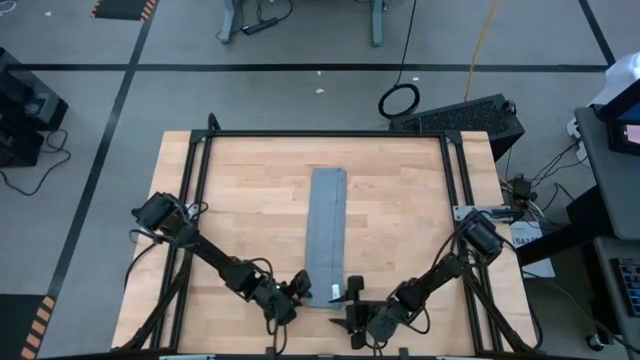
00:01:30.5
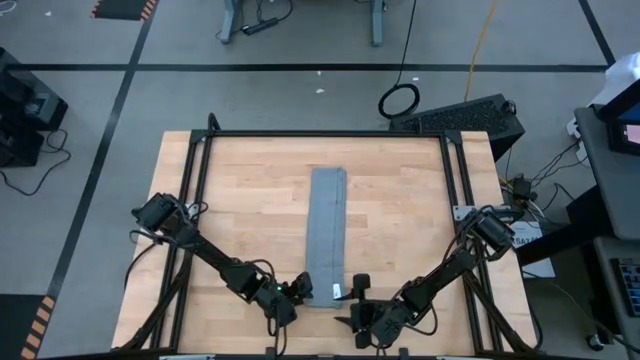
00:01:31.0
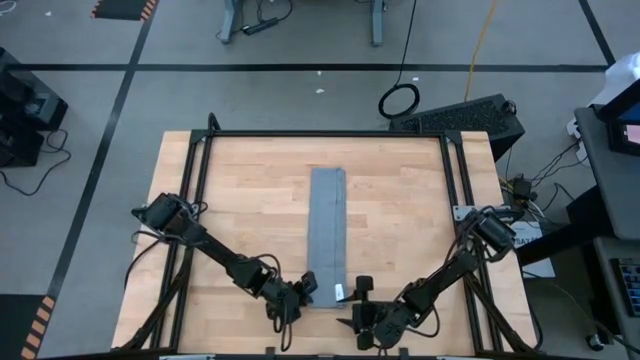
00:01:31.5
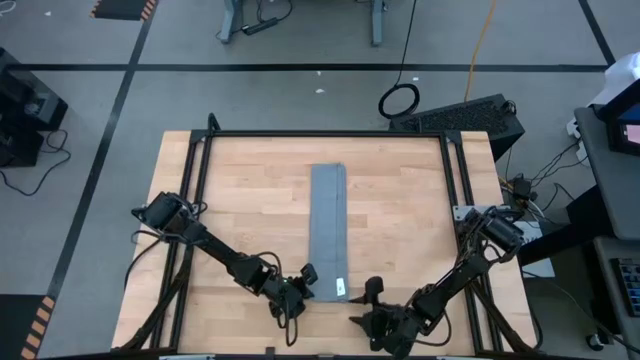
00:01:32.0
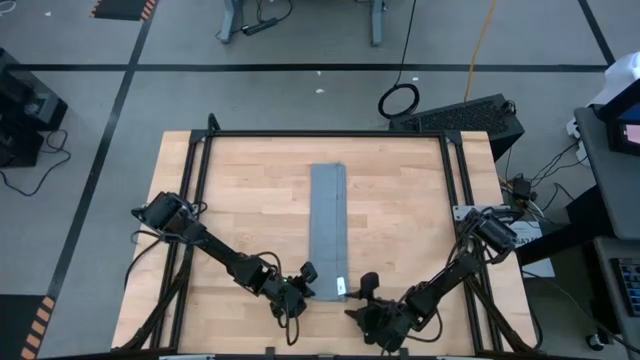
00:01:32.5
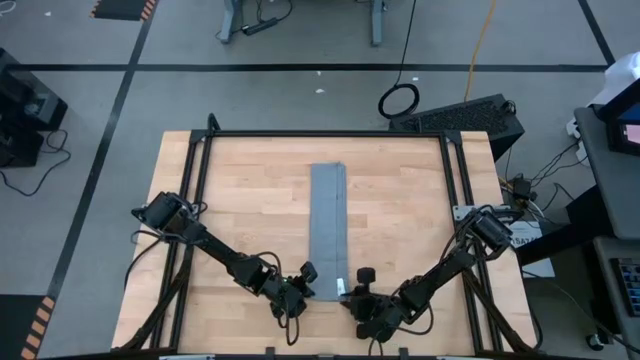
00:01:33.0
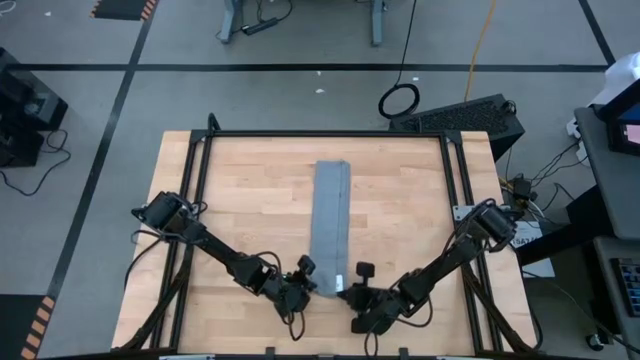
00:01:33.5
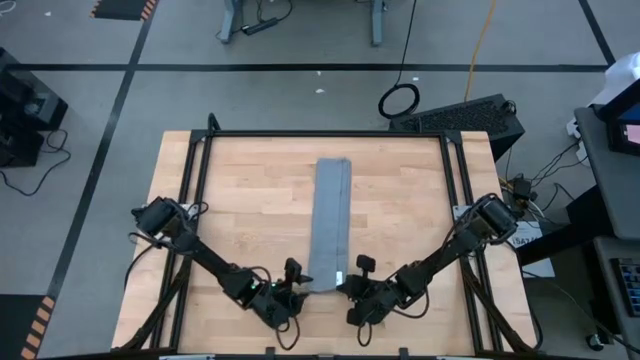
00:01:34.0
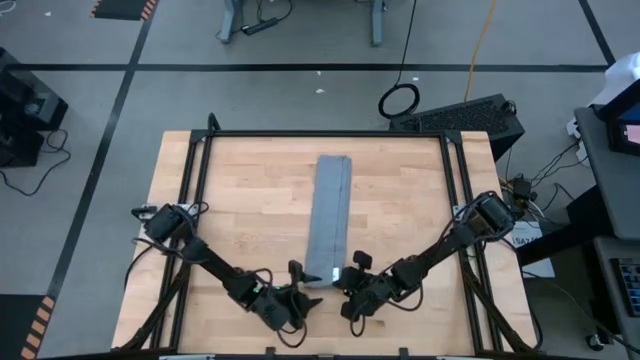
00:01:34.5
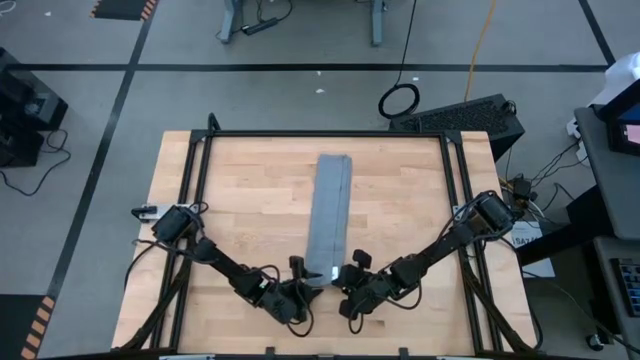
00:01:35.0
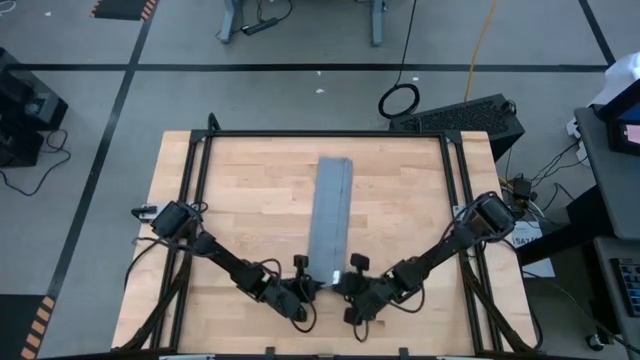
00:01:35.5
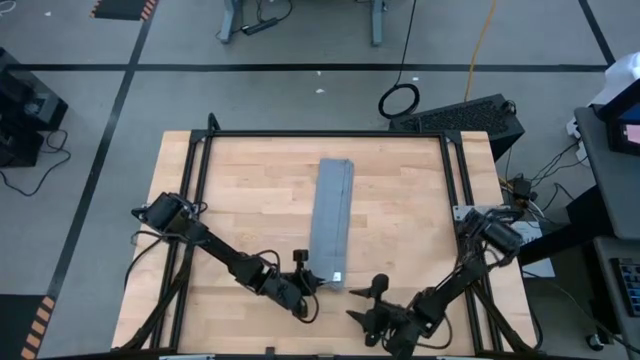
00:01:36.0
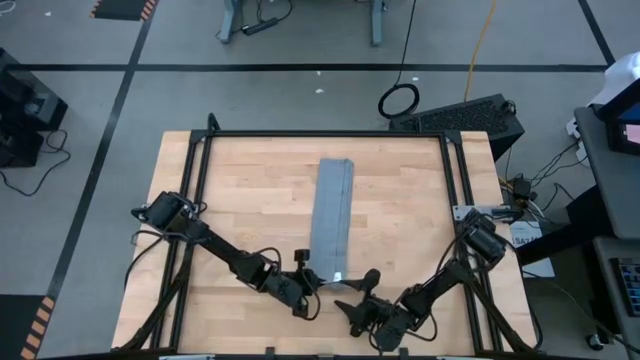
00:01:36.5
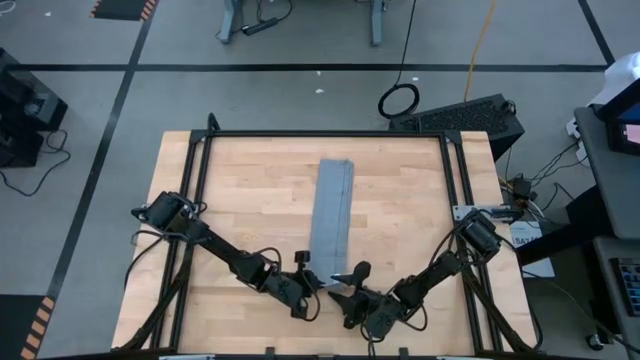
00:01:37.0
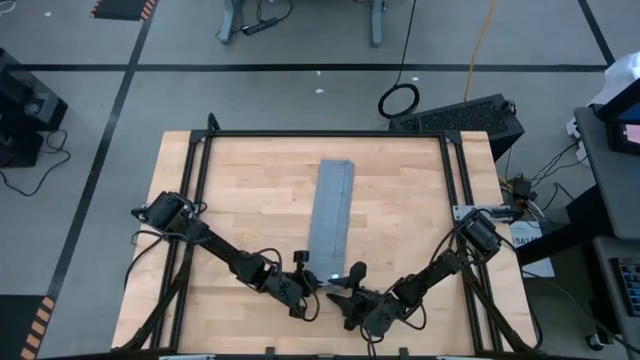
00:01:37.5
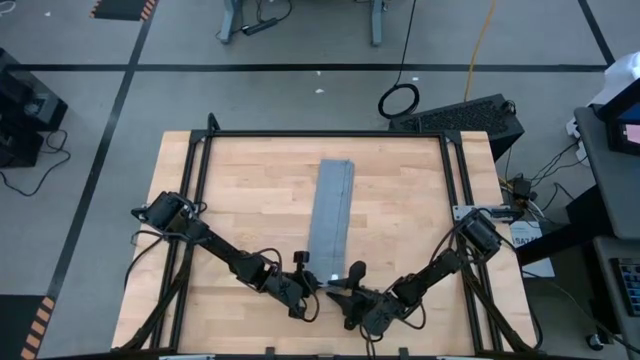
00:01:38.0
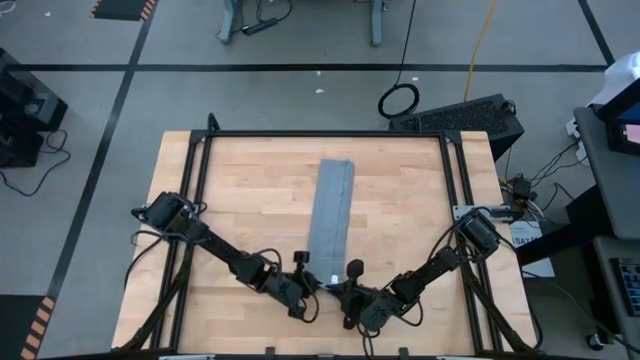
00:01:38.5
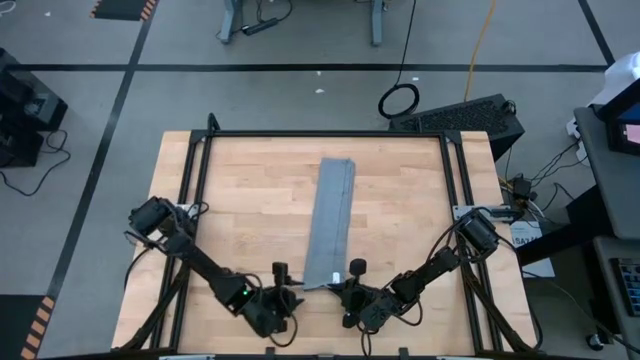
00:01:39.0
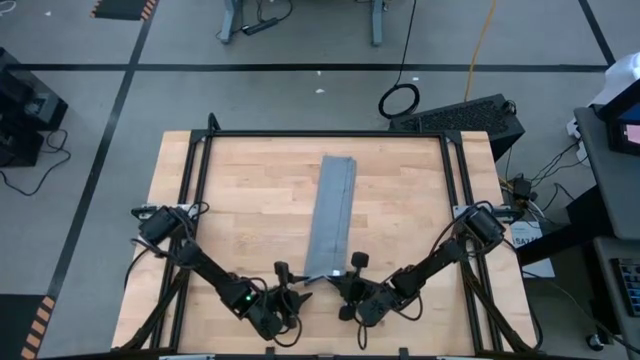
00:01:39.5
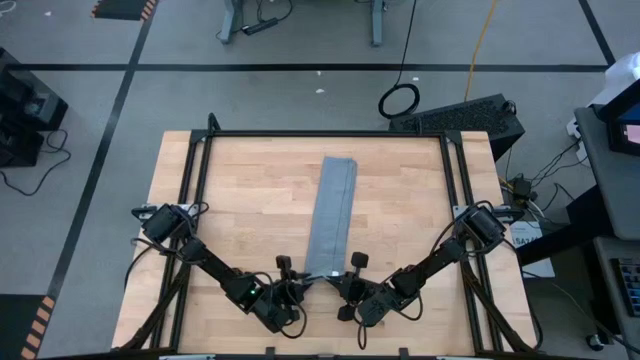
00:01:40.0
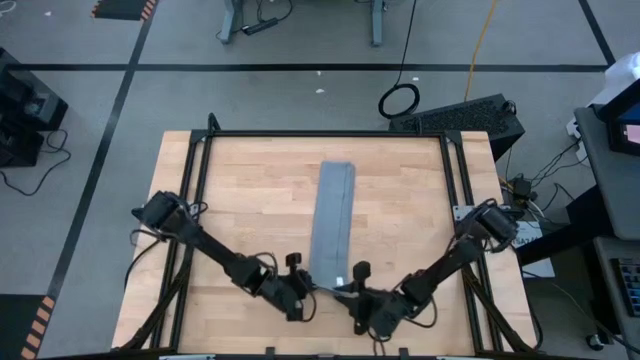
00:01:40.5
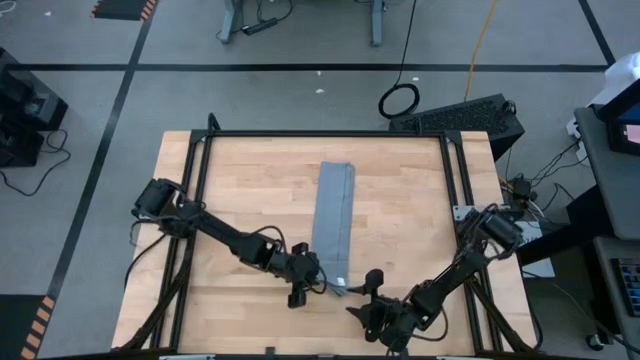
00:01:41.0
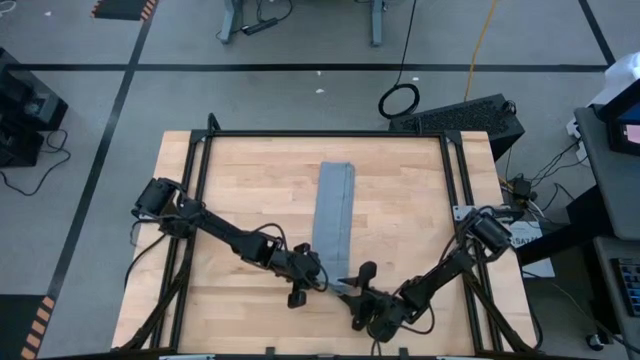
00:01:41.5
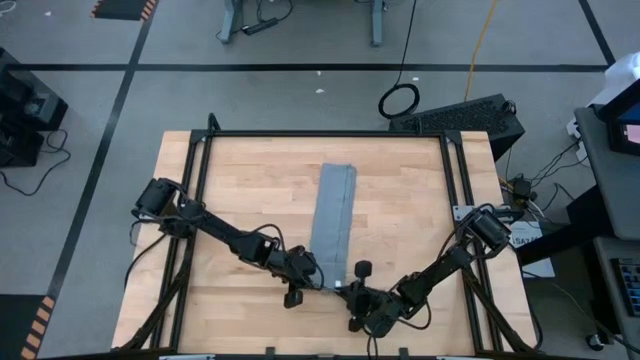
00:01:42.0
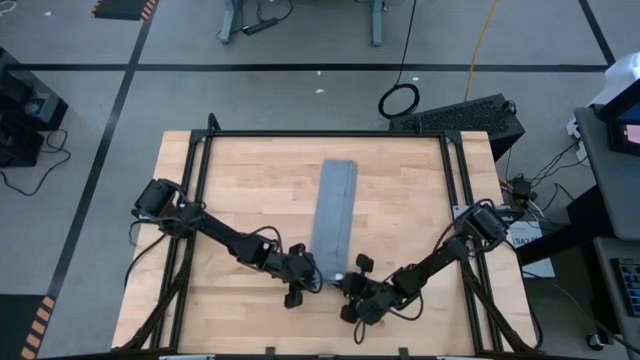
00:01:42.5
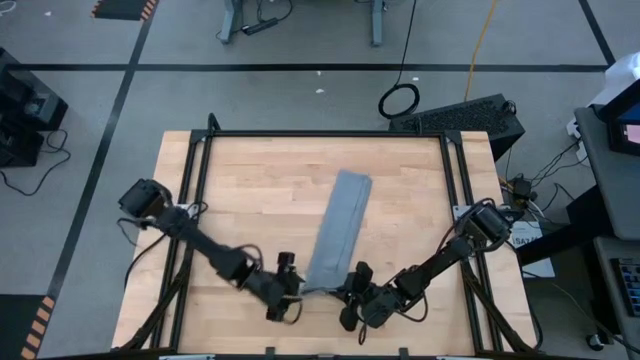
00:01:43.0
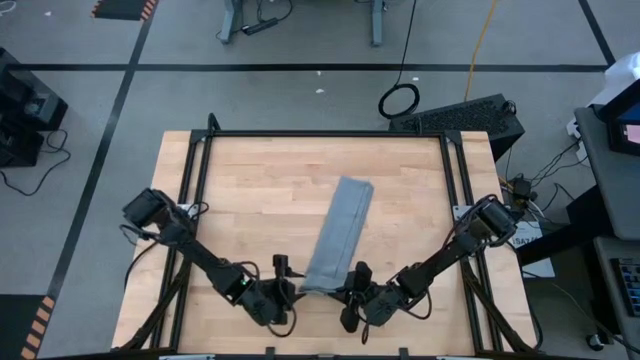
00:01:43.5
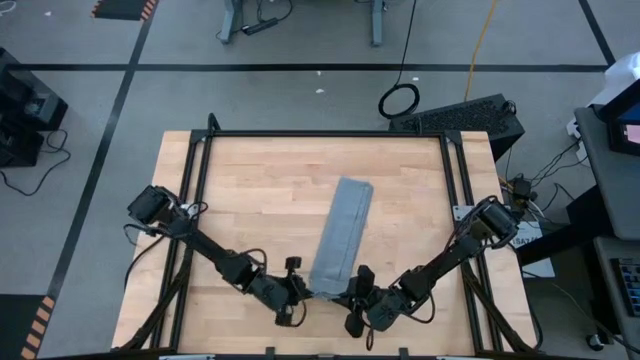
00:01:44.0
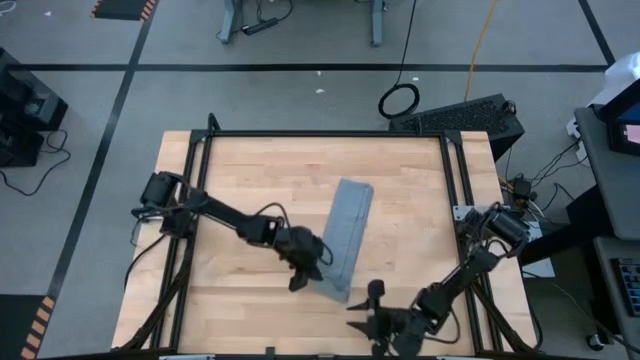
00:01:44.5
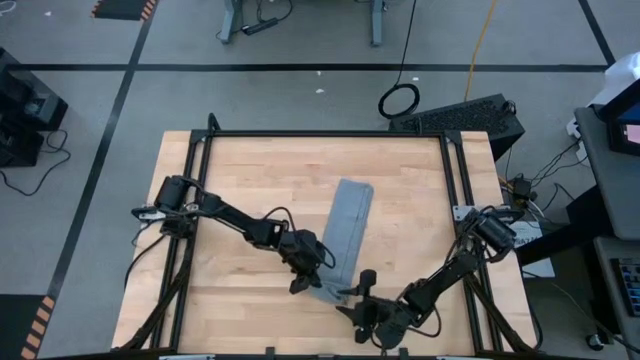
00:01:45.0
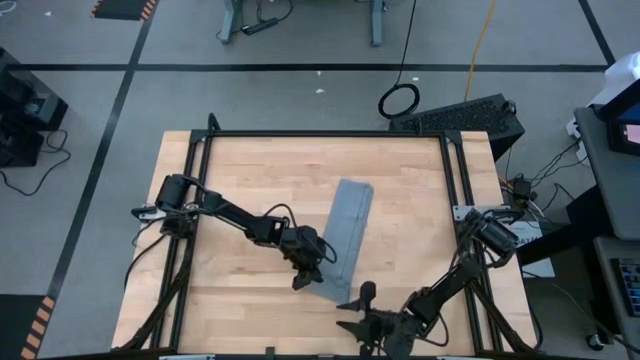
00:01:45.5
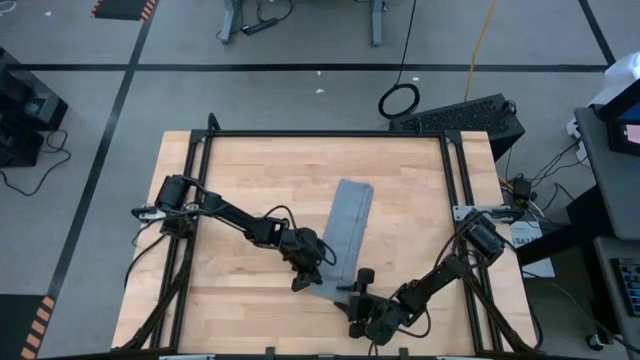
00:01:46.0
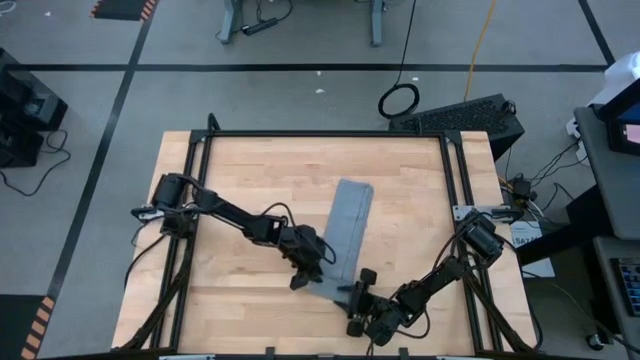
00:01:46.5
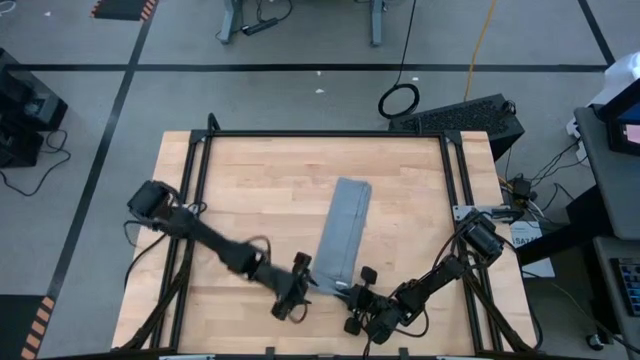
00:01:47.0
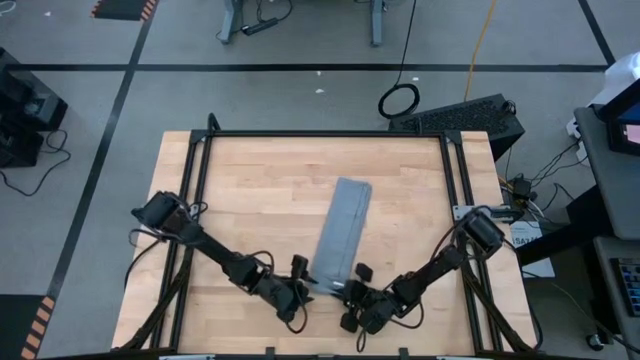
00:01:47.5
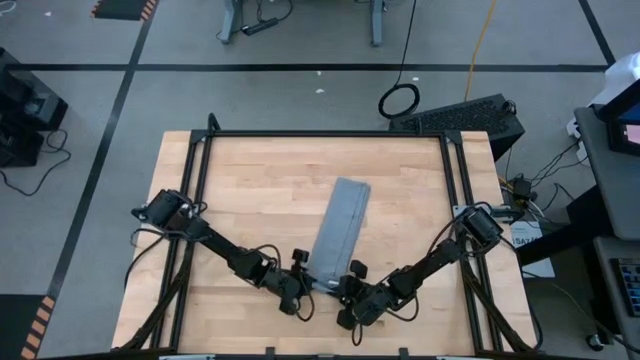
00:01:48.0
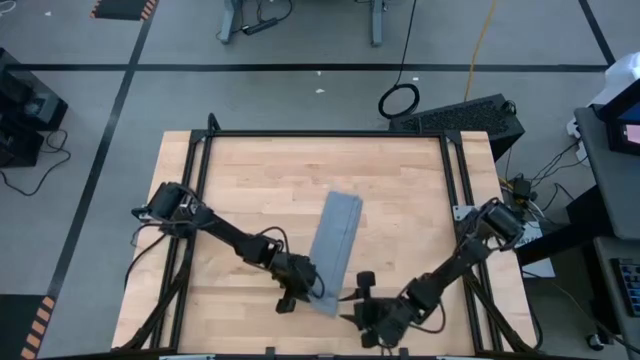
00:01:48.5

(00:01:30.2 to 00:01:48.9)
Task: Roll towel
Roll the gray towel on the table

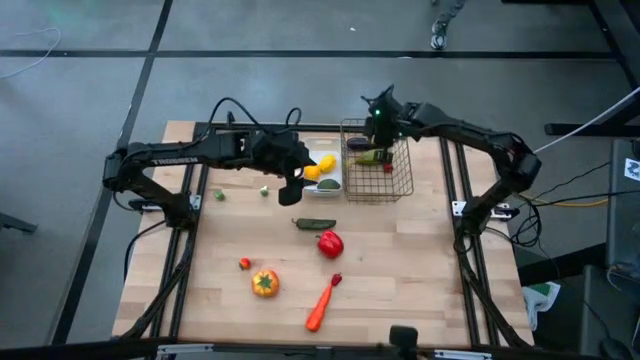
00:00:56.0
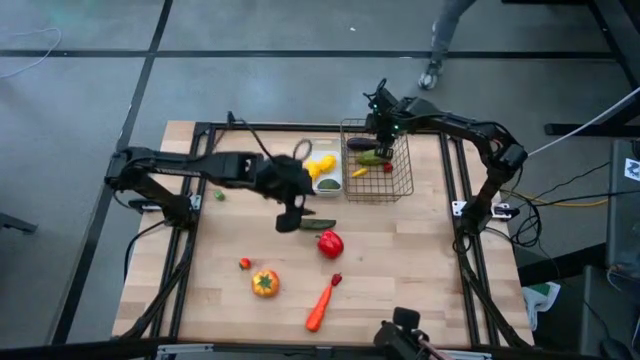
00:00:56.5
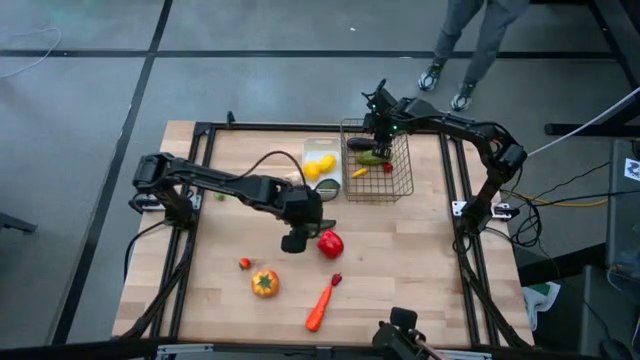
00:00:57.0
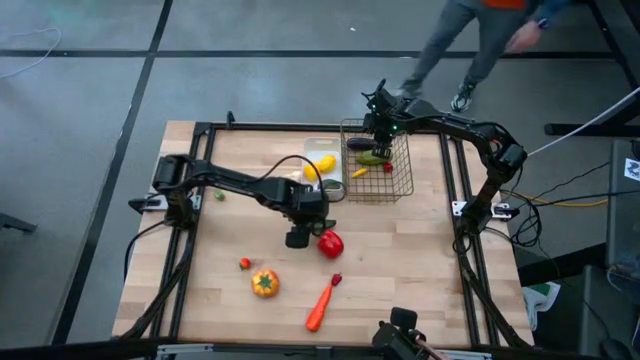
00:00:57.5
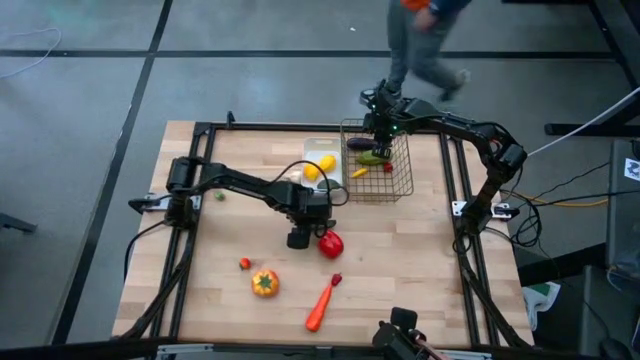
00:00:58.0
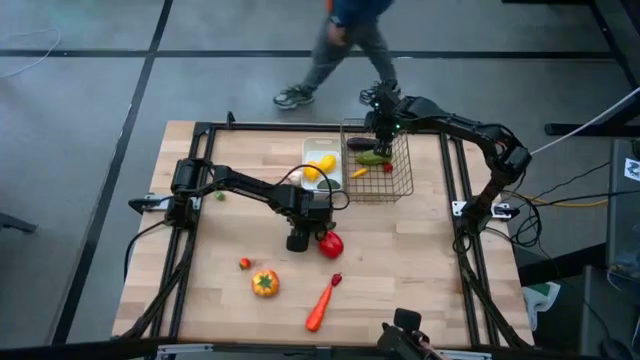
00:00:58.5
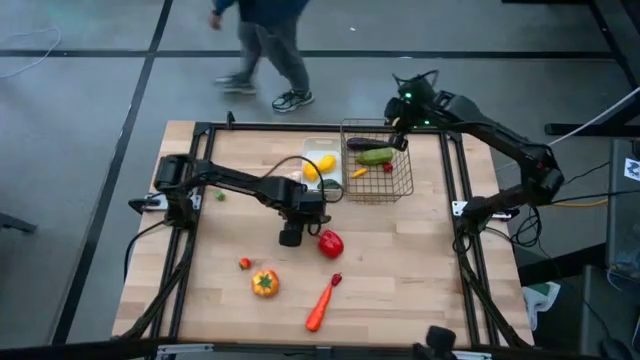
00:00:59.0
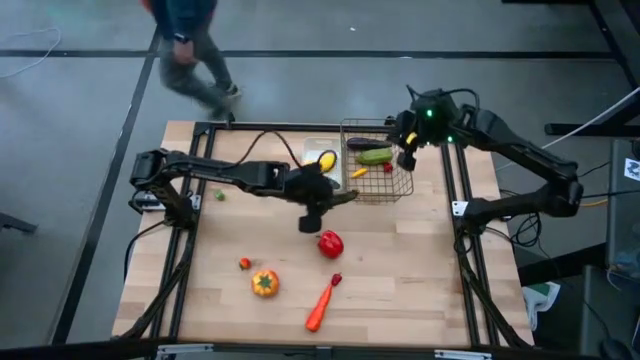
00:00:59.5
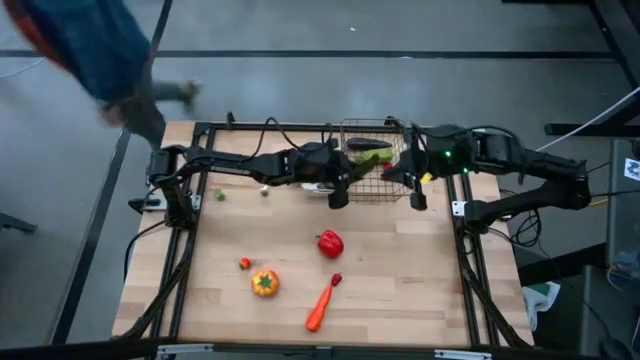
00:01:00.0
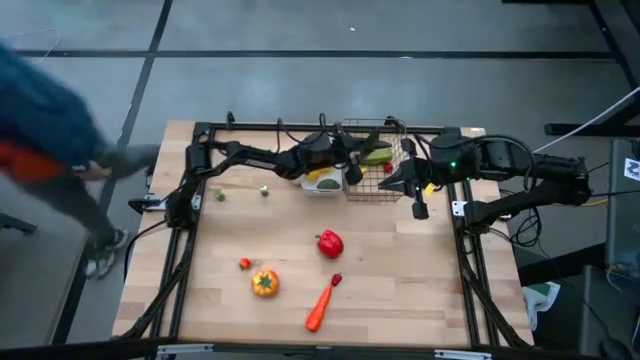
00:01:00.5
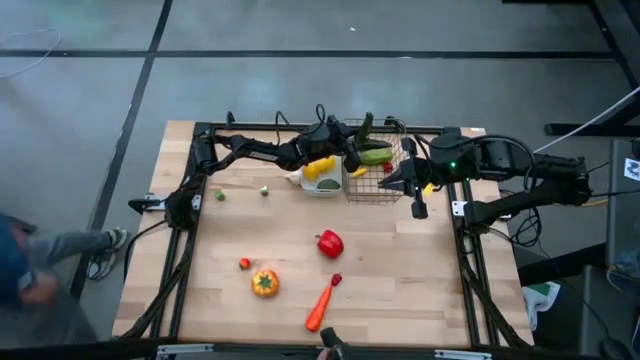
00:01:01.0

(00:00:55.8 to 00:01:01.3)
Task: Sort produce into baskets
Put the green chili pepper into the gold wire basket
